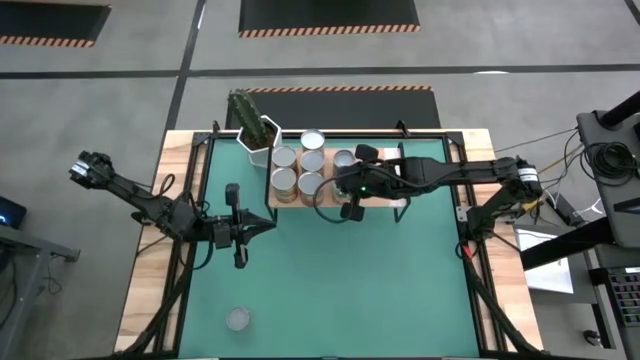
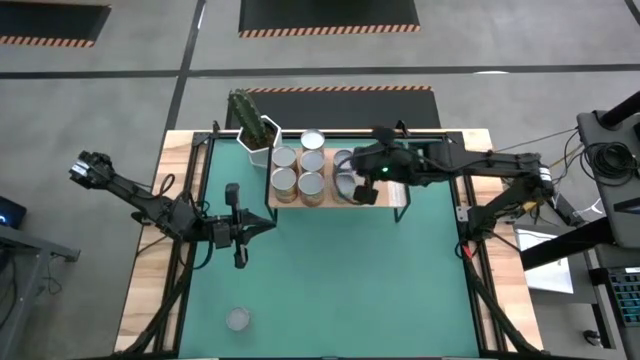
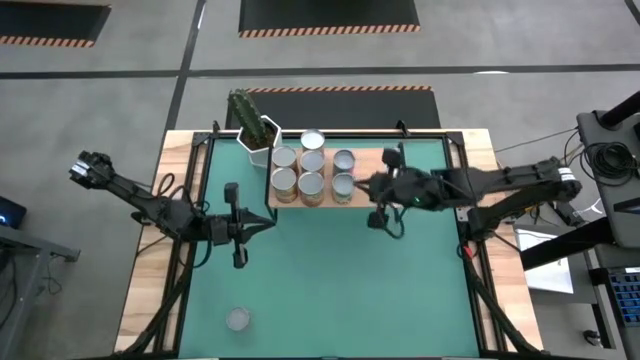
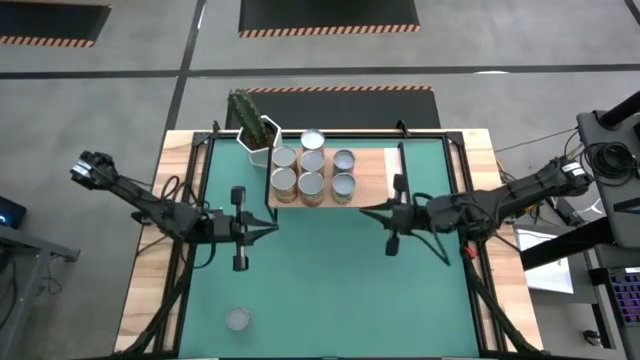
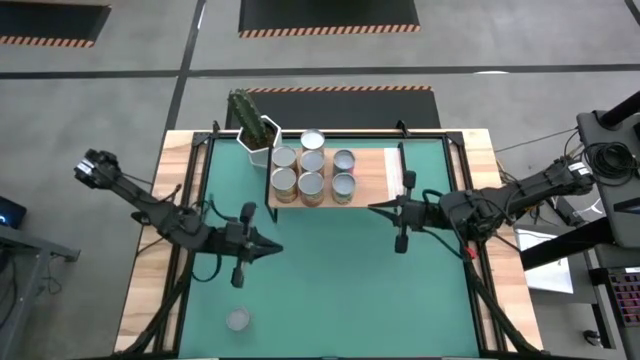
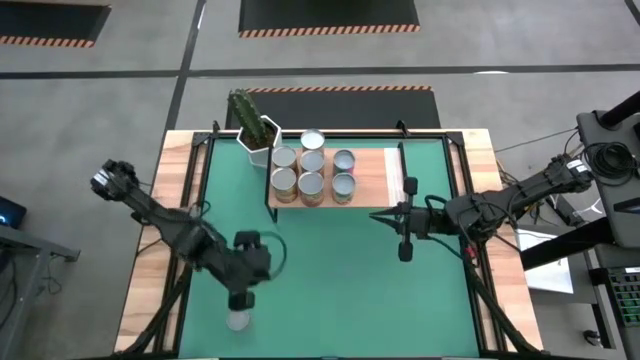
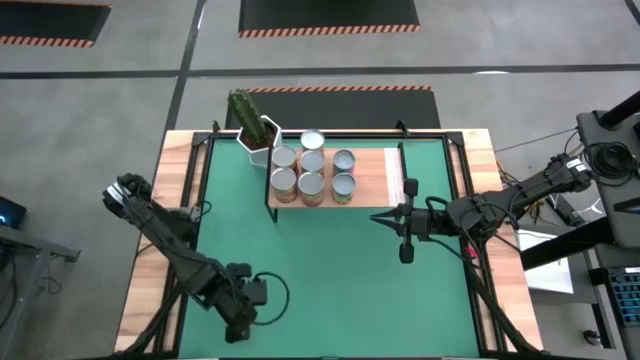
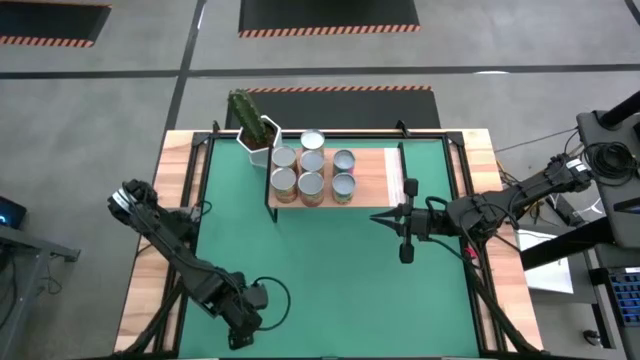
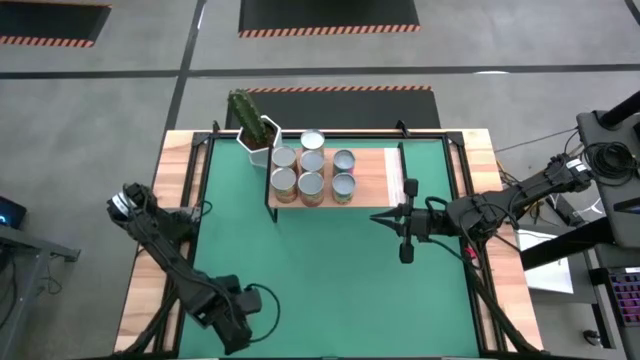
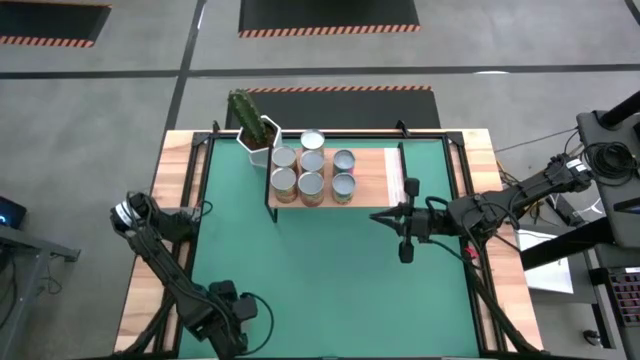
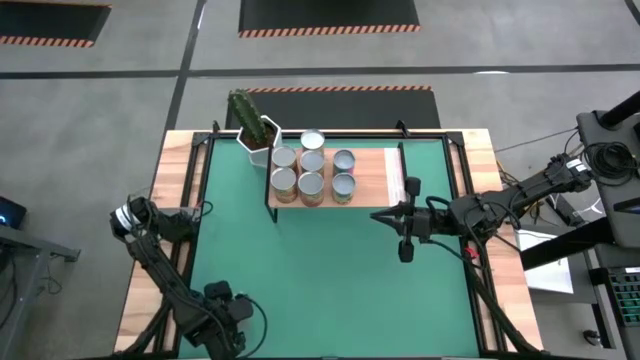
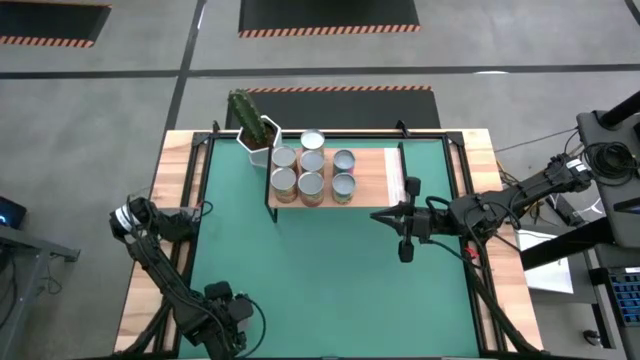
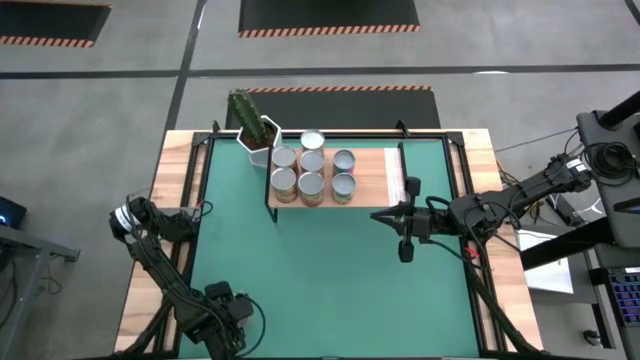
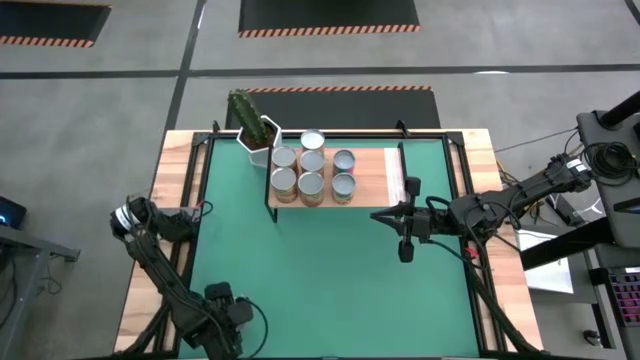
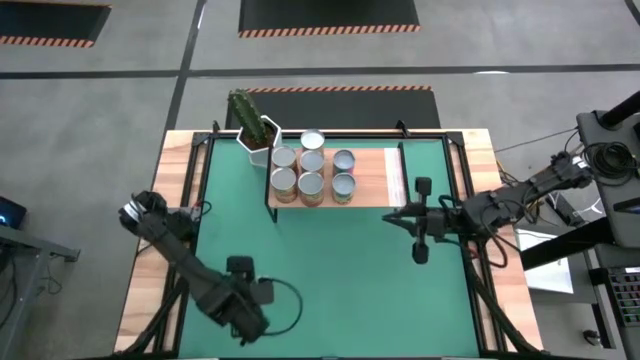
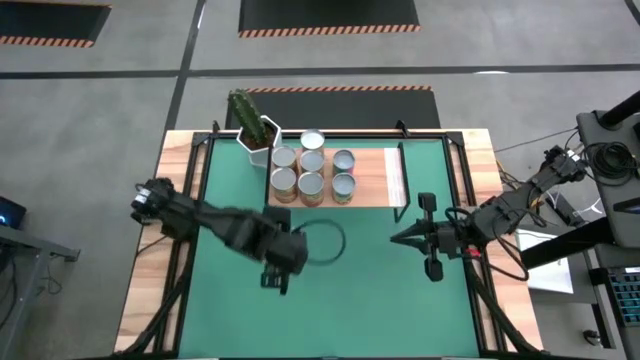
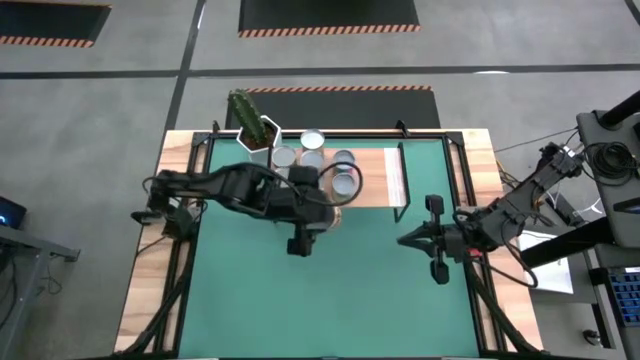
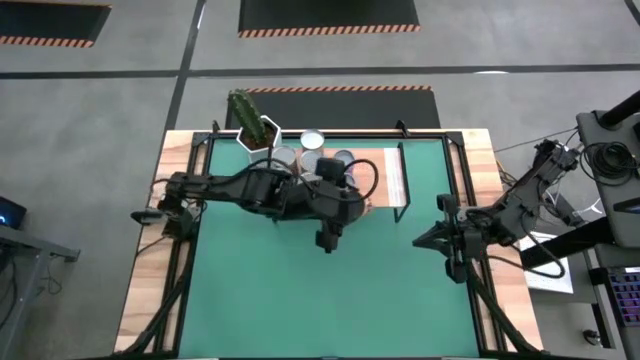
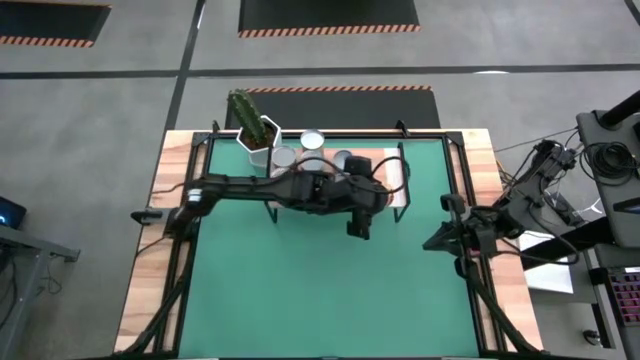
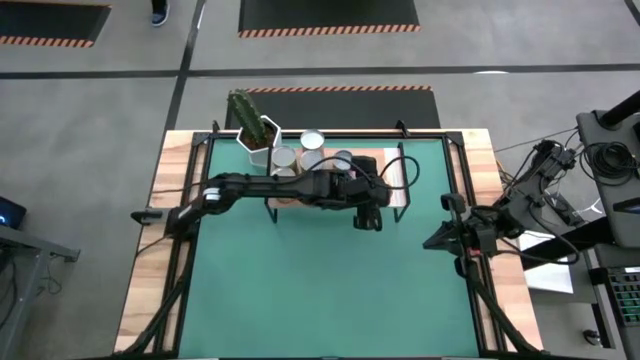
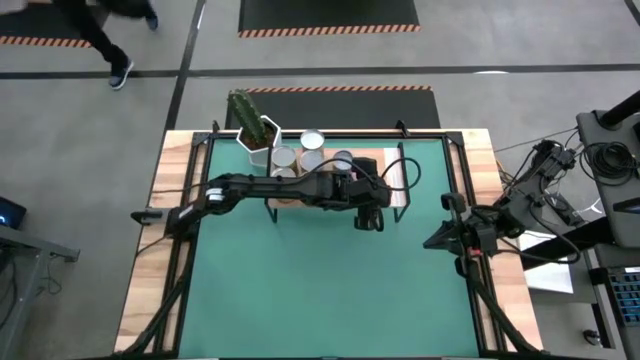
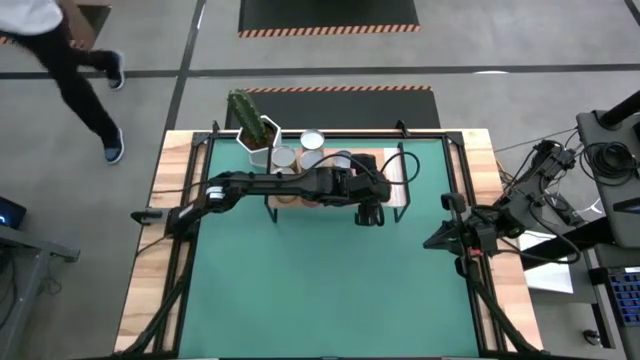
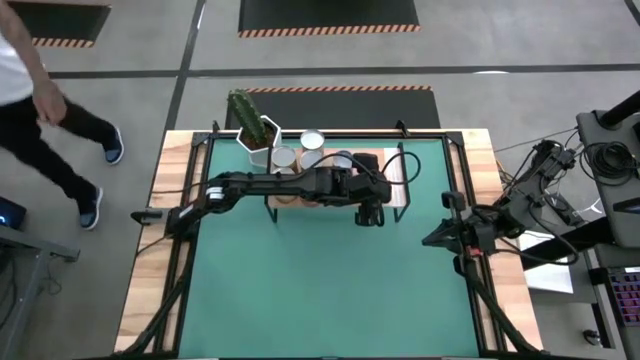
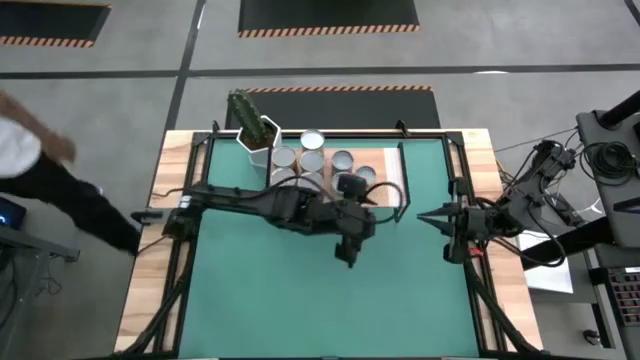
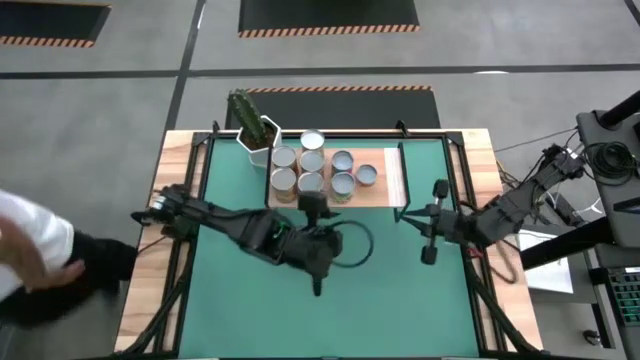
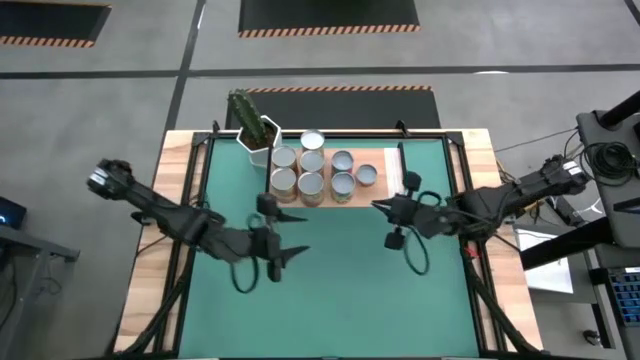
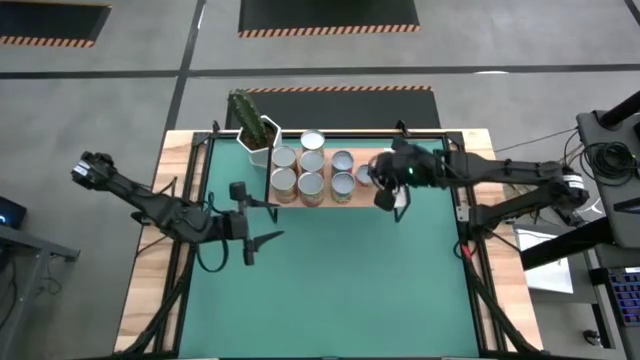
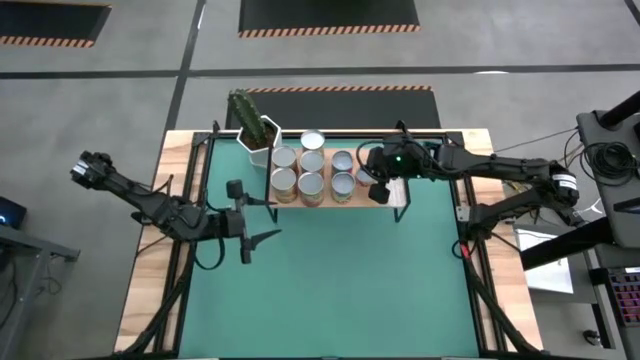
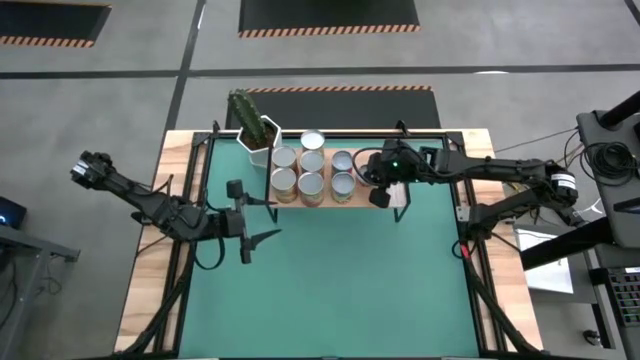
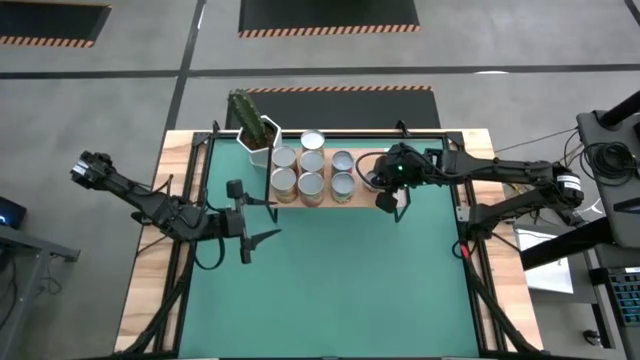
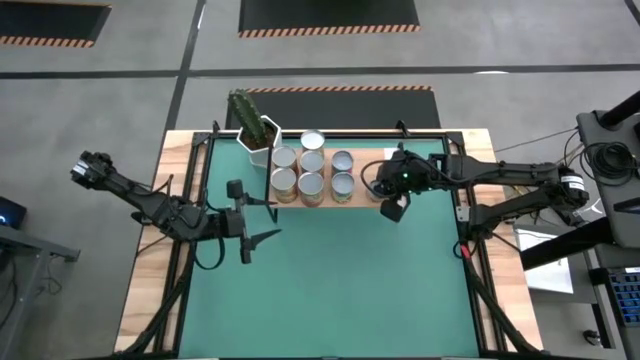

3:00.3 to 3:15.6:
Task: Pick and place cans onto a shelf
Put the canned pineapple rings on the shelf

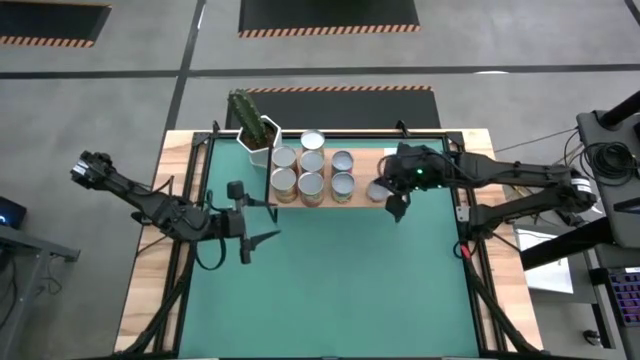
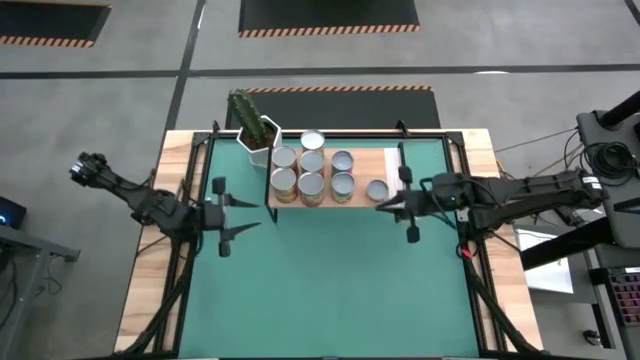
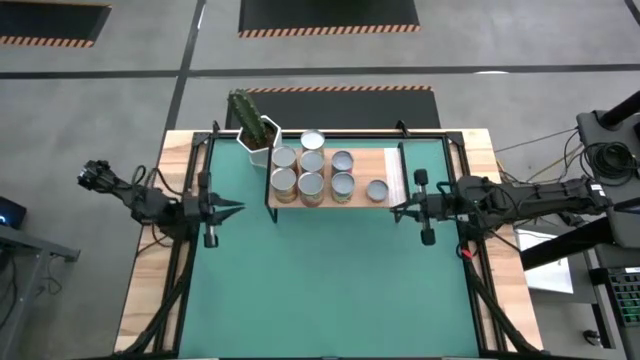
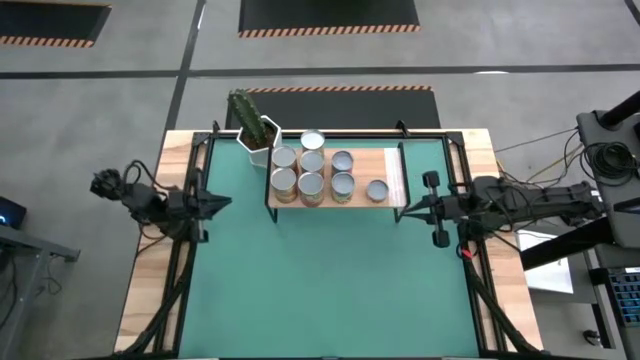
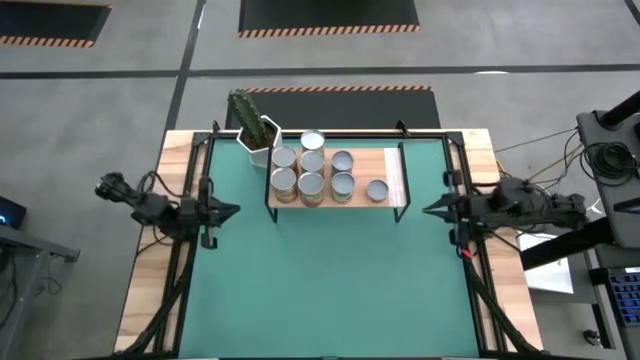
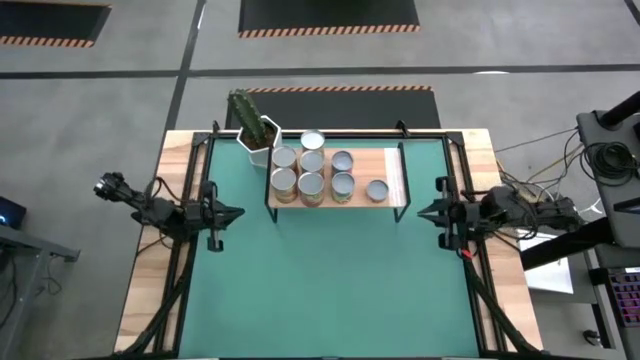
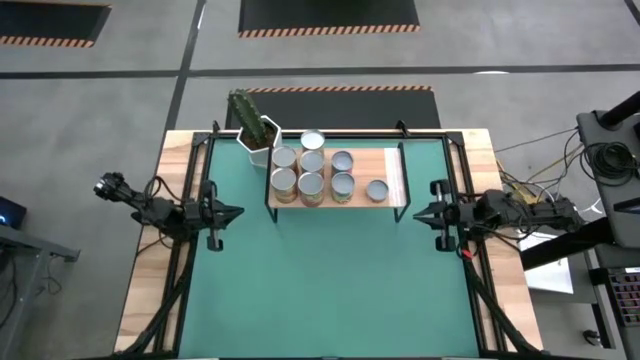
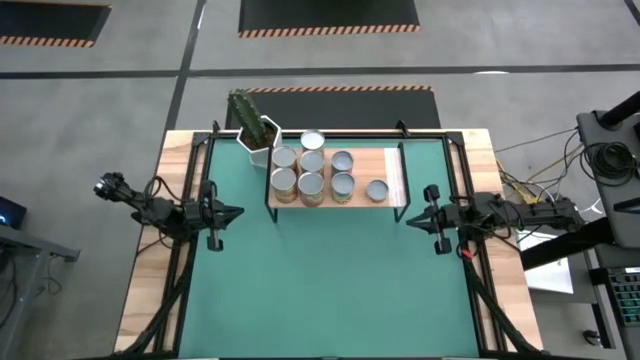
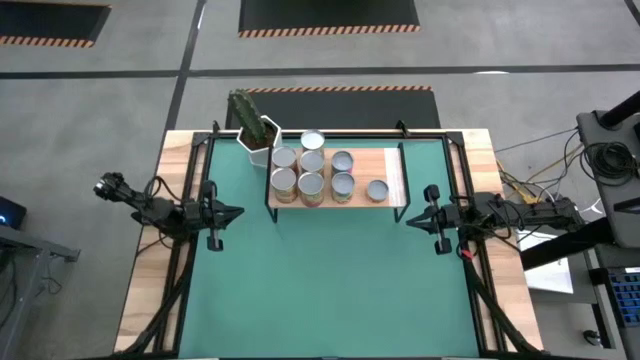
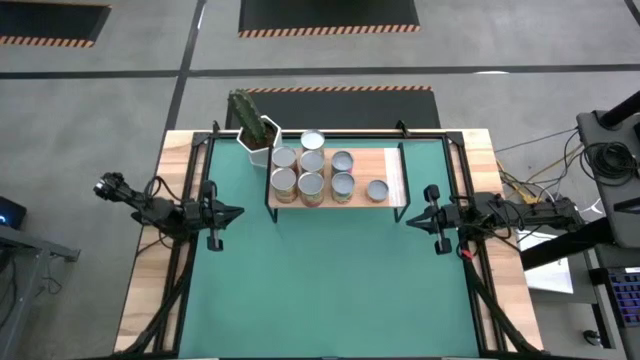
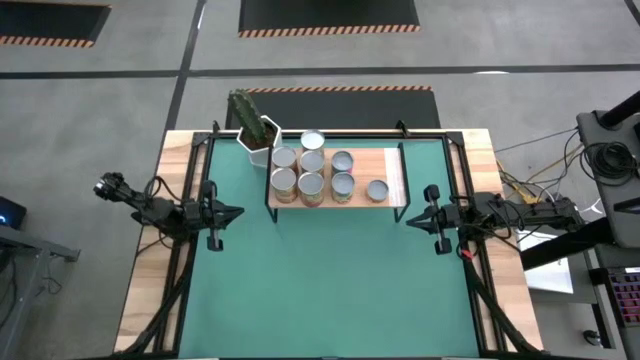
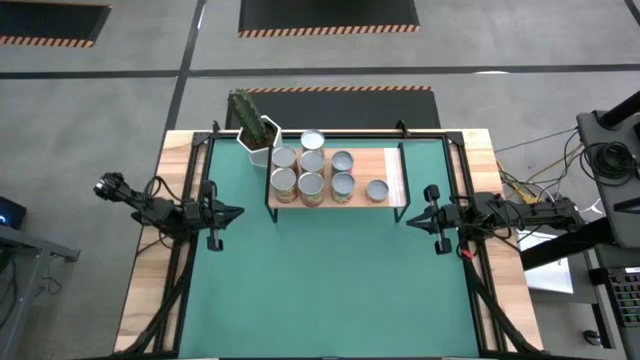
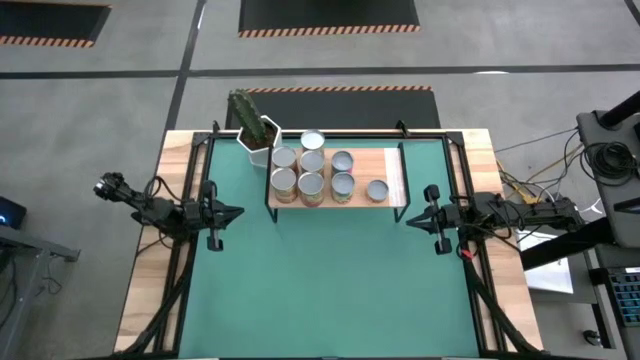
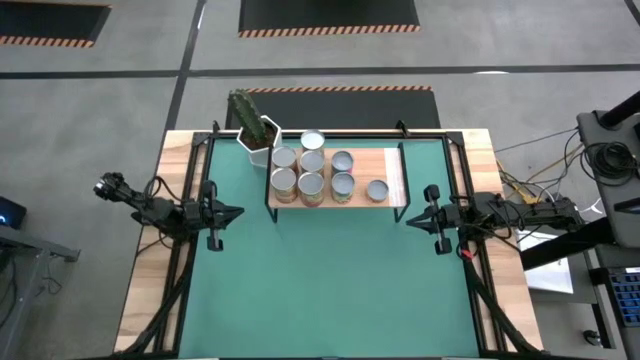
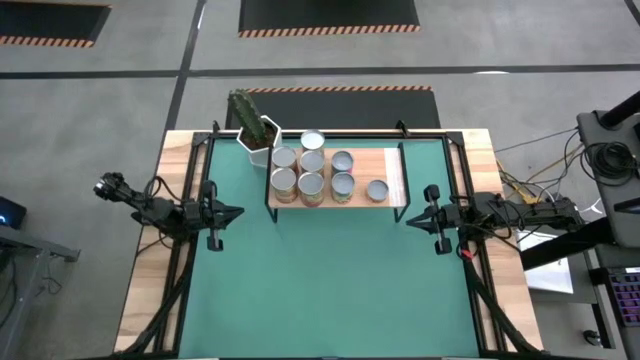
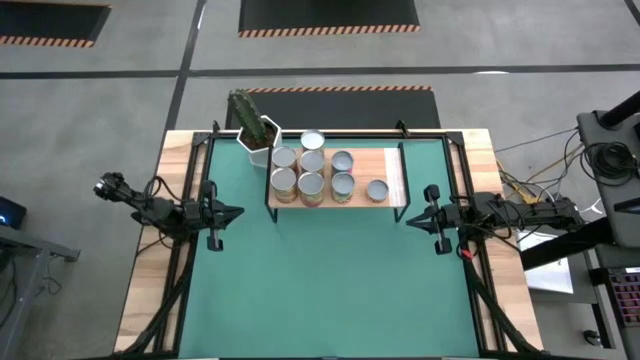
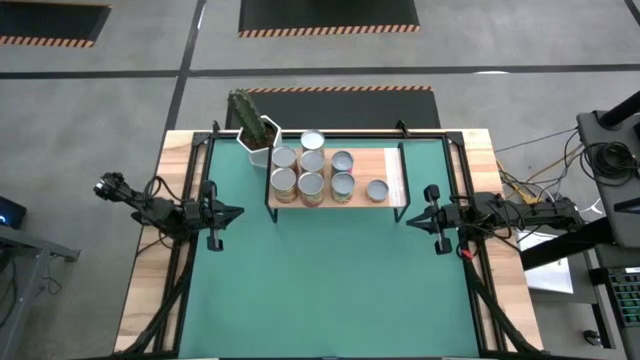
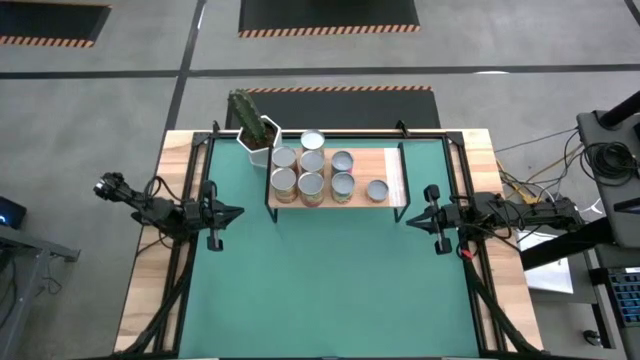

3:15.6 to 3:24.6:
Return to Home Position
